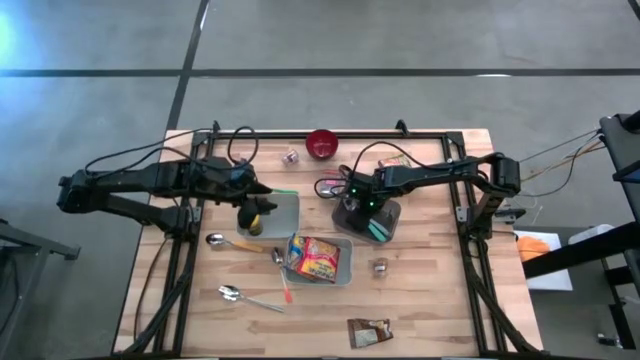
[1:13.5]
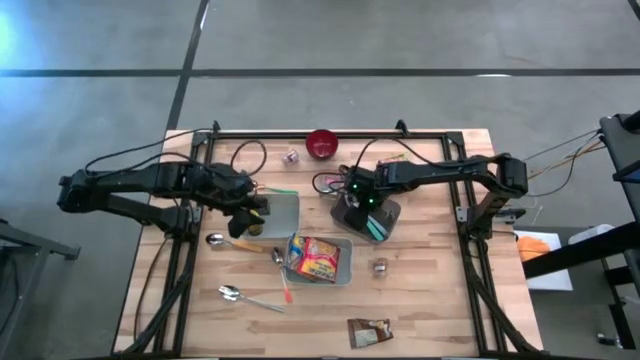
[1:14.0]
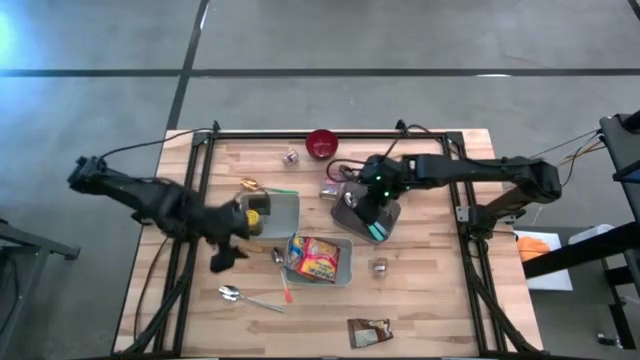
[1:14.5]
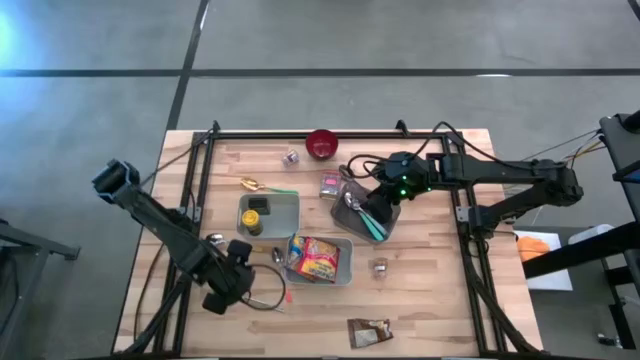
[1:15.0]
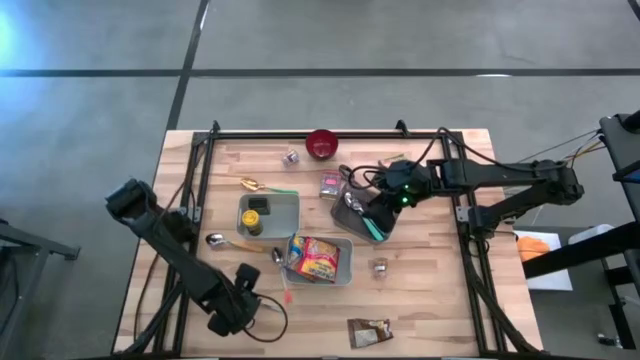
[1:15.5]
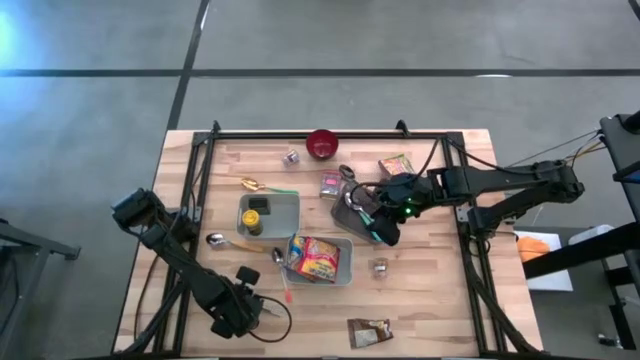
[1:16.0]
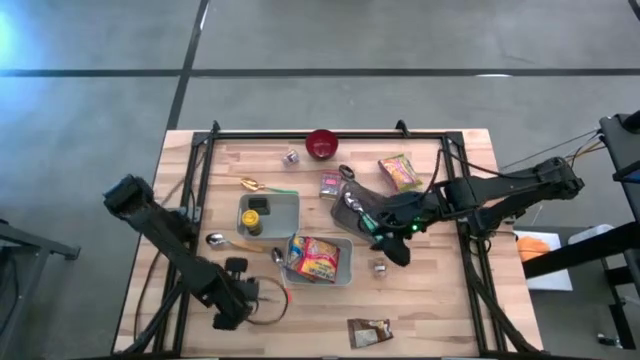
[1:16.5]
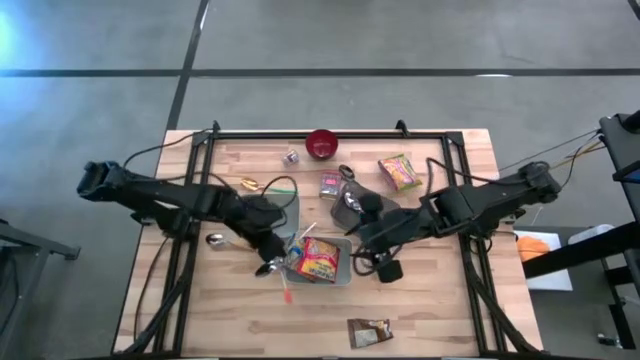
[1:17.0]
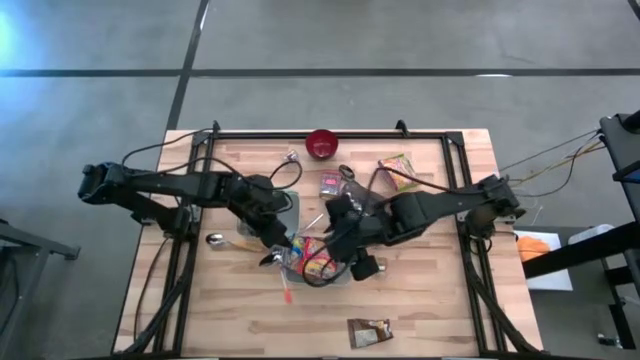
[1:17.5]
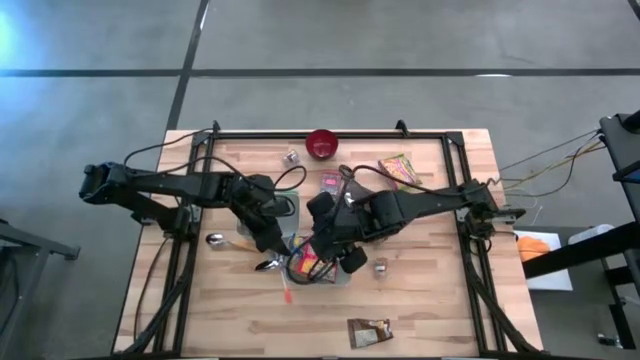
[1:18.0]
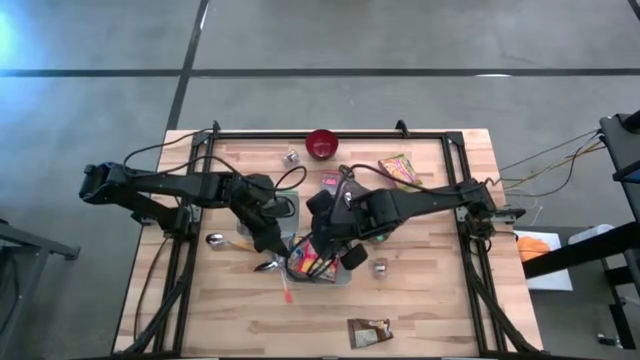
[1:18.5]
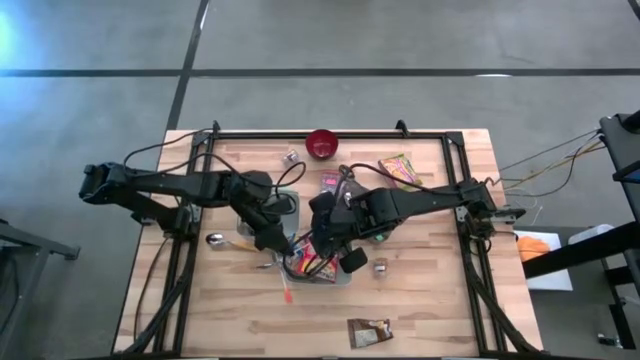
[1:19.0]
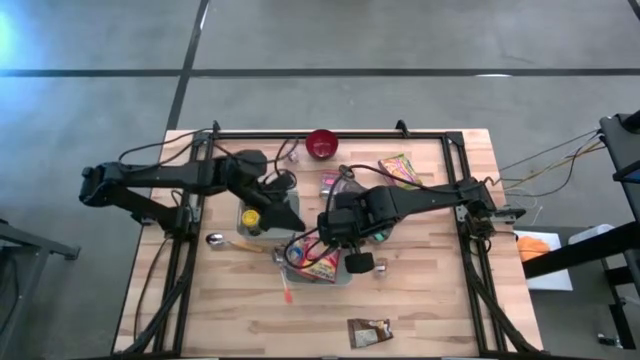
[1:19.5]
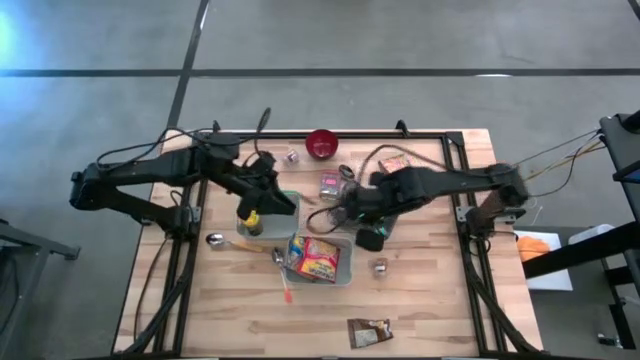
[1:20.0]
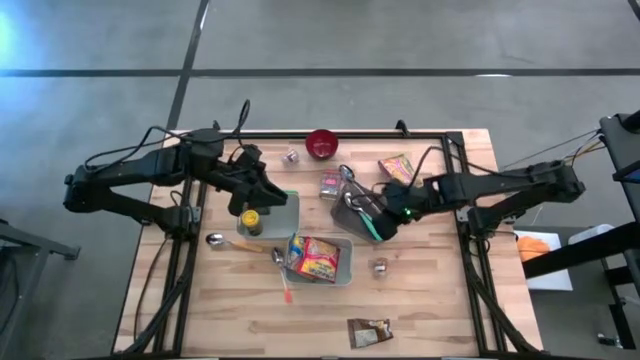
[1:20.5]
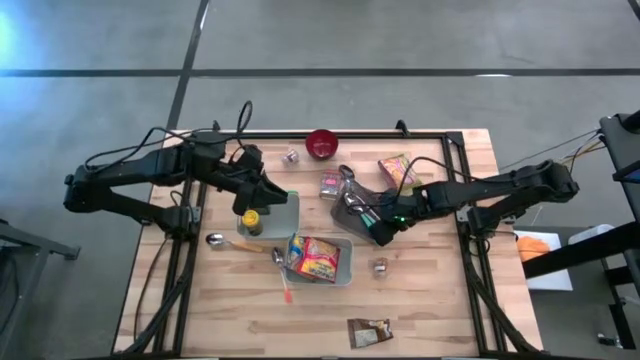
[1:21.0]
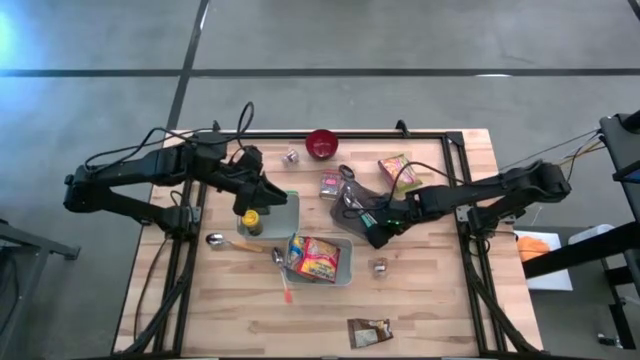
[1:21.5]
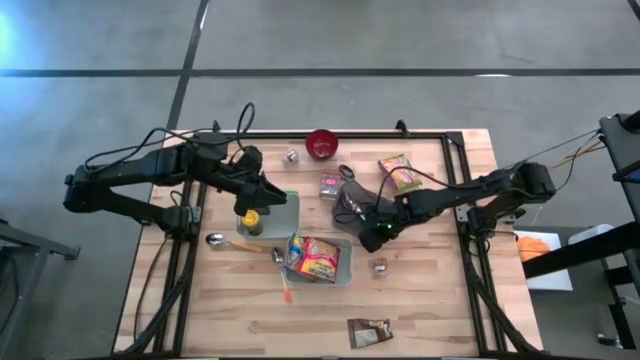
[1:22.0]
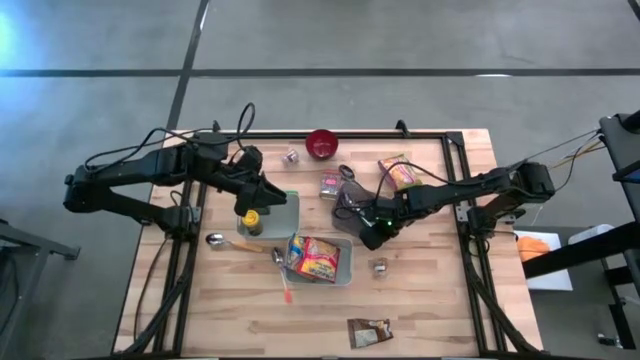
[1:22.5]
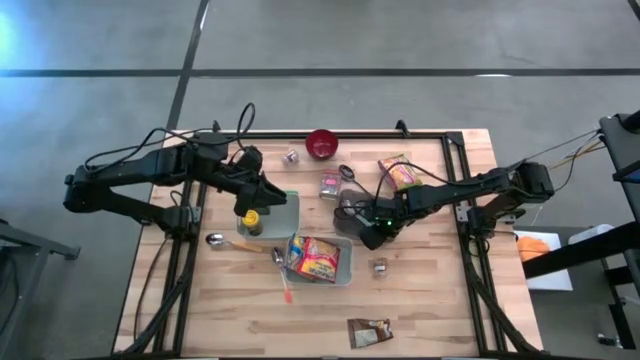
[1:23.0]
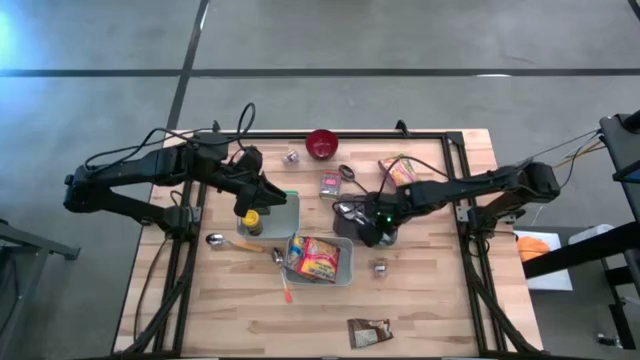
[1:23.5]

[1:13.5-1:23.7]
Put the silver spoon into the black bin
